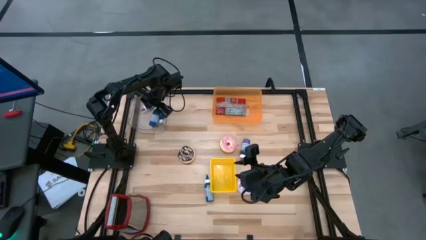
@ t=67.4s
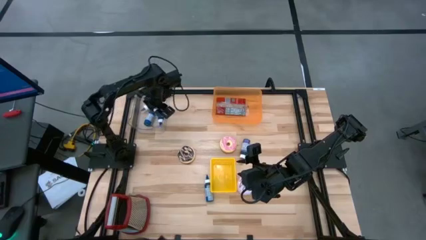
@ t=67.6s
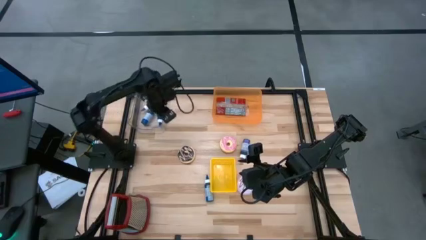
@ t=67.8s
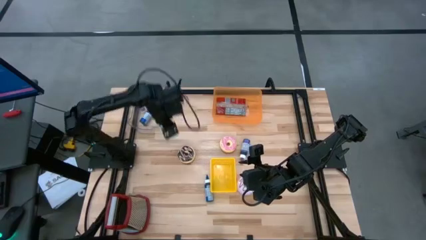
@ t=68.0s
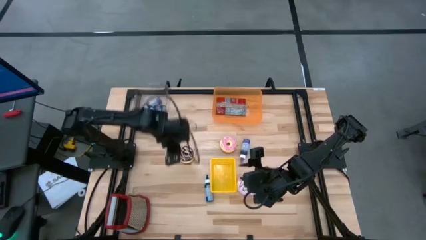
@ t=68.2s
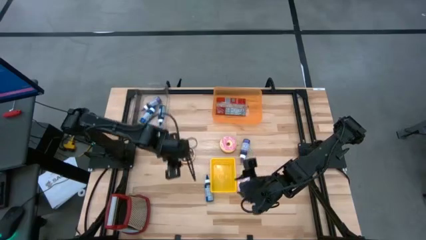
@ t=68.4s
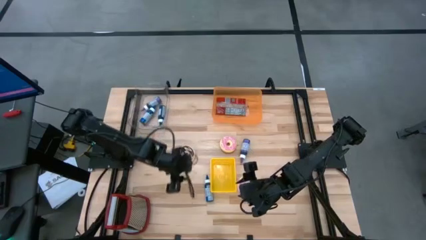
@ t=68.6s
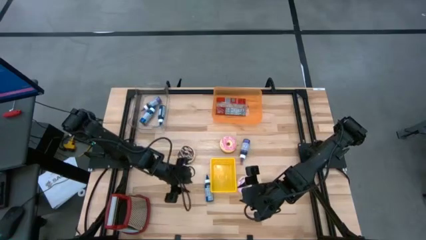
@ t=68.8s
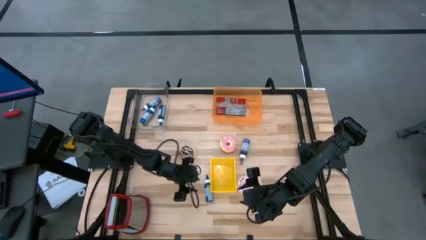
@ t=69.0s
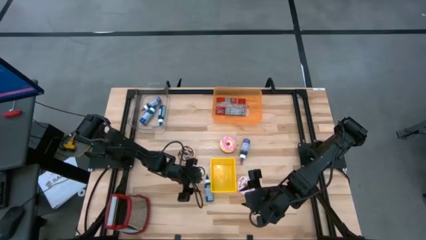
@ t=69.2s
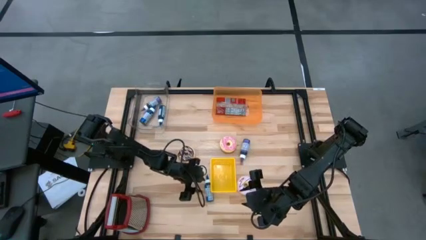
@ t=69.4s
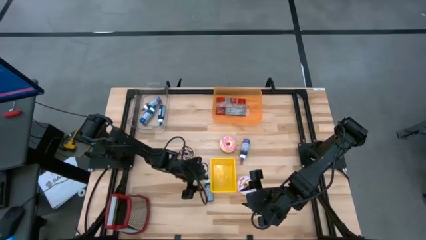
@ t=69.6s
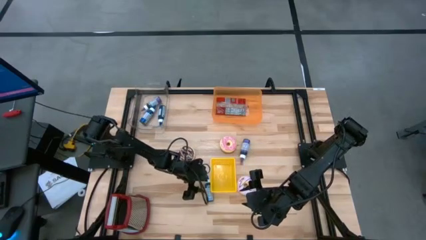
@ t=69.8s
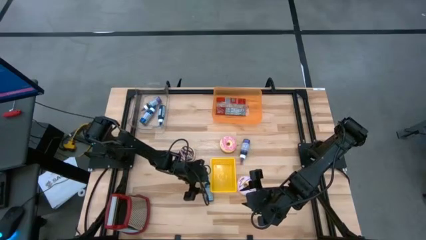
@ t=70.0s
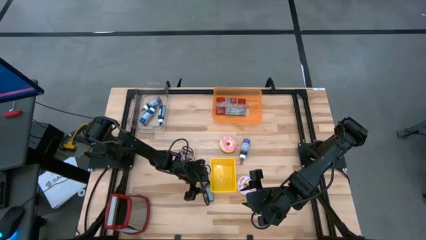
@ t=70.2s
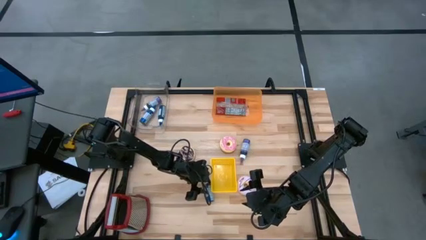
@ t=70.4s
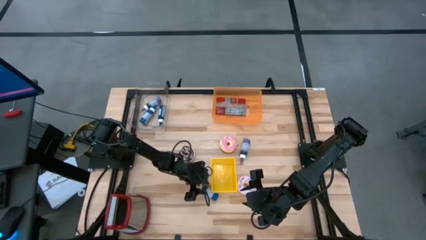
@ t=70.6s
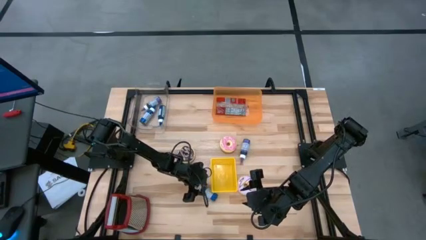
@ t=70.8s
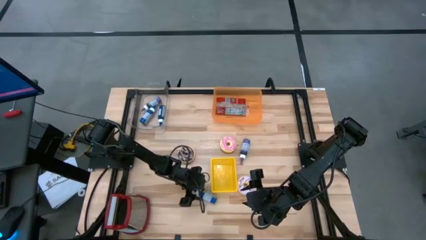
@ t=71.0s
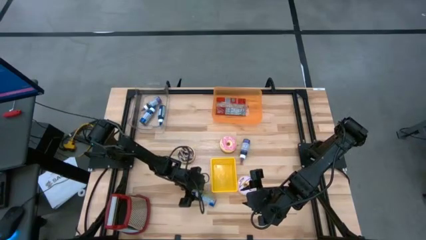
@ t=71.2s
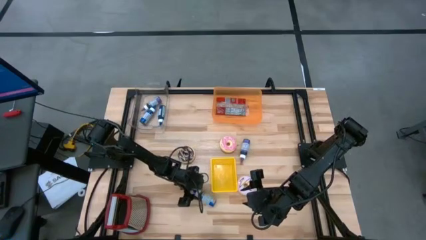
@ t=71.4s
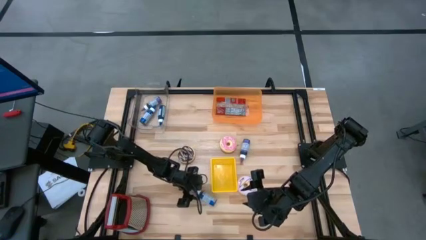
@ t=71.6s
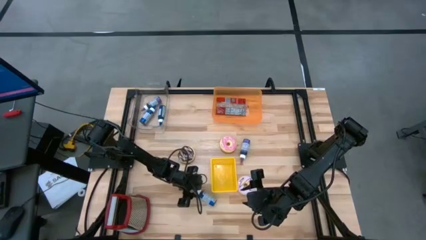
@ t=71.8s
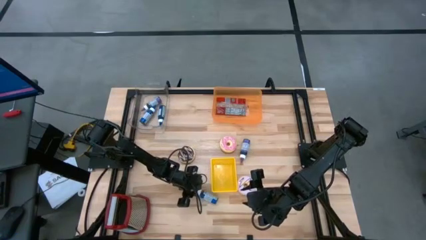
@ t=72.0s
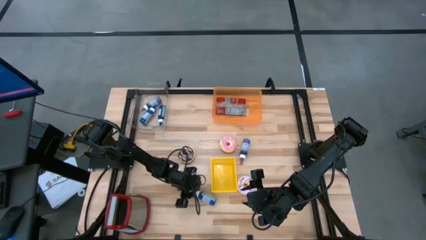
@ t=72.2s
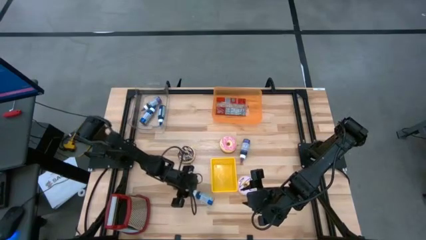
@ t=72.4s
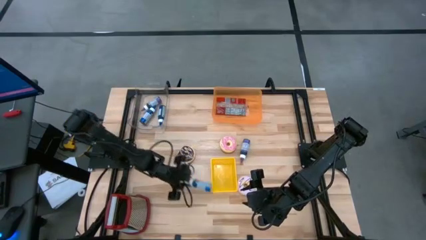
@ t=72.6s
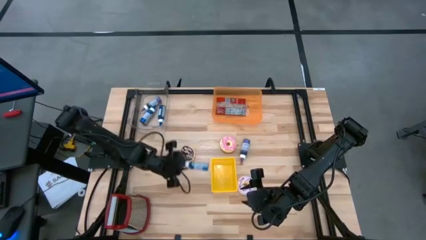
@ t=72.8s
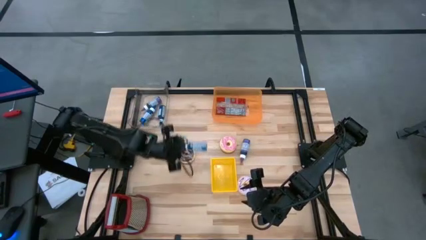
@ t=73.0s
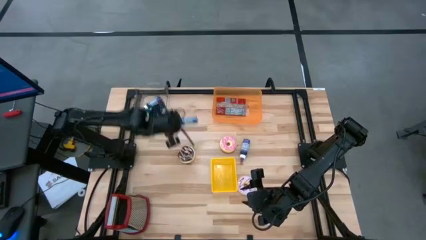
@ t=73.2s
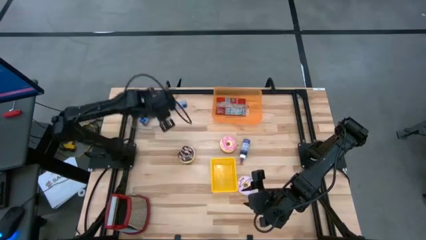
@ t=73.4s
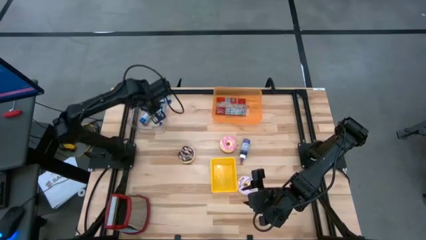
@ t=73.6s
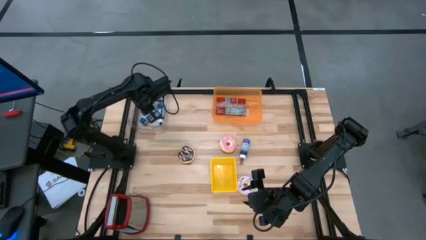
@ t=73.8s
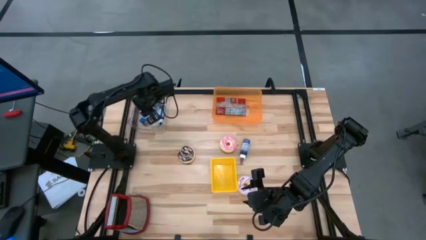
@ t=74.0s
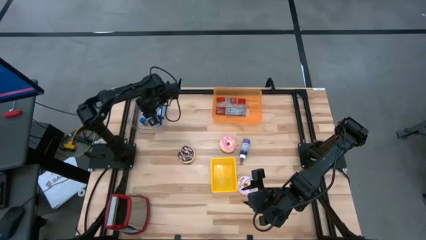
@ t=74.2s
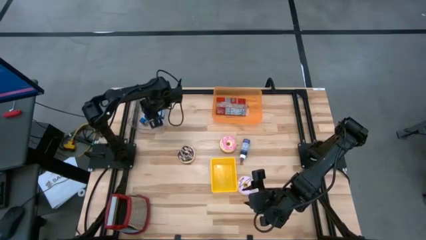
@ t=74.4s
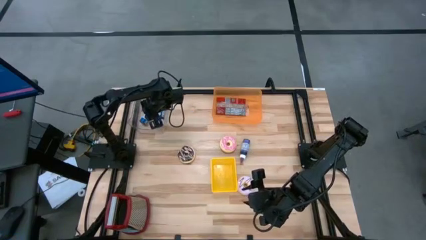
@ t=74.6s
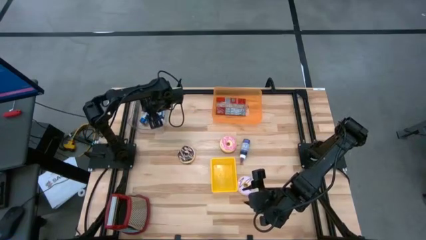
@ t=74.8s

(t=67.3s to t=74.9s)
Put the blue food coloring bottle into the transparent bin

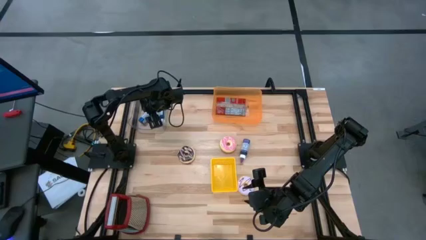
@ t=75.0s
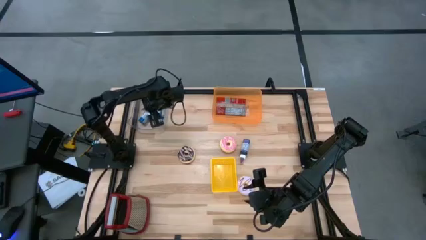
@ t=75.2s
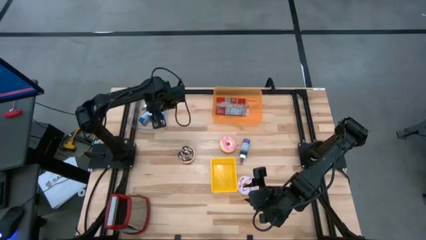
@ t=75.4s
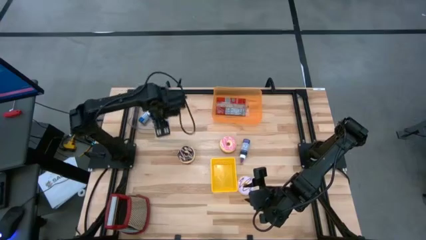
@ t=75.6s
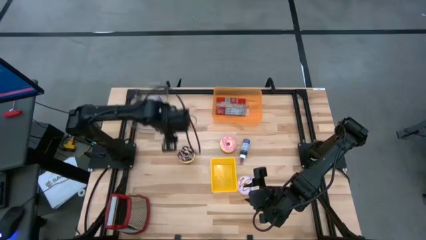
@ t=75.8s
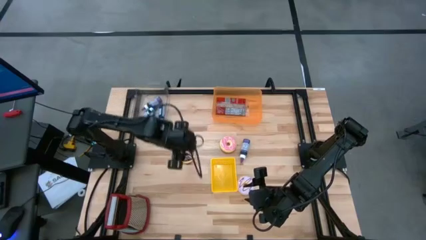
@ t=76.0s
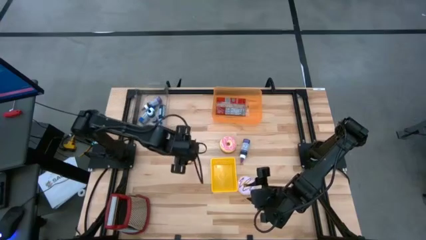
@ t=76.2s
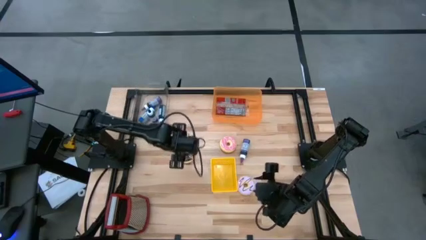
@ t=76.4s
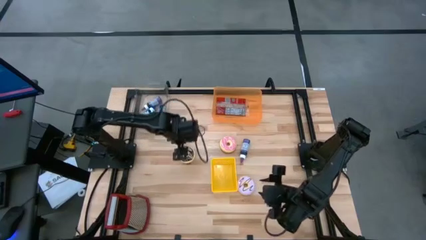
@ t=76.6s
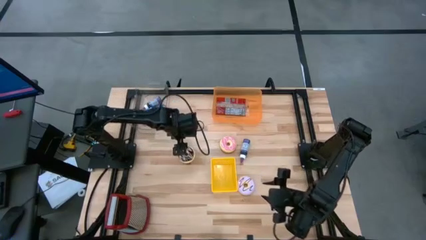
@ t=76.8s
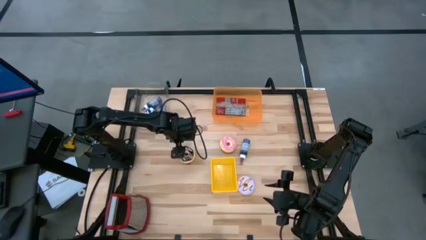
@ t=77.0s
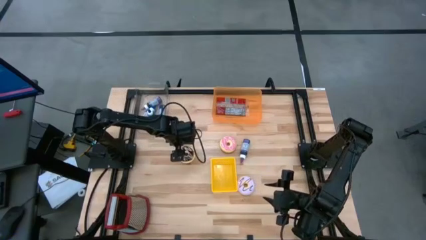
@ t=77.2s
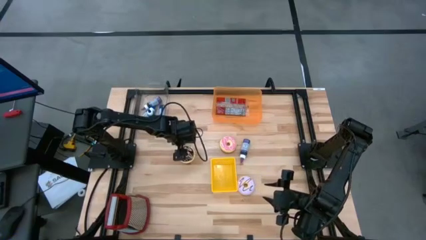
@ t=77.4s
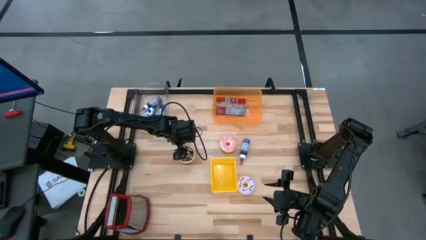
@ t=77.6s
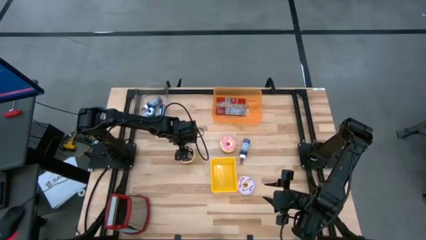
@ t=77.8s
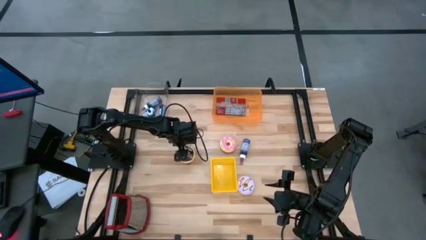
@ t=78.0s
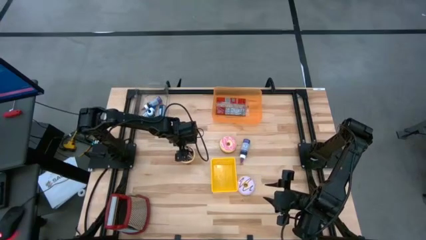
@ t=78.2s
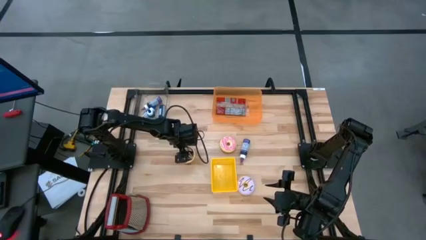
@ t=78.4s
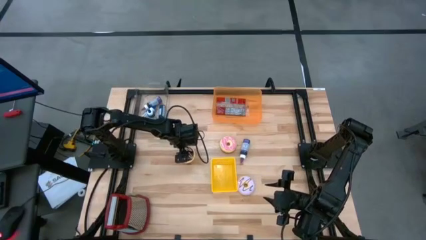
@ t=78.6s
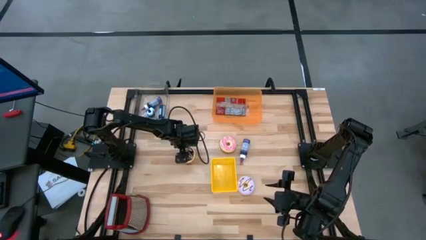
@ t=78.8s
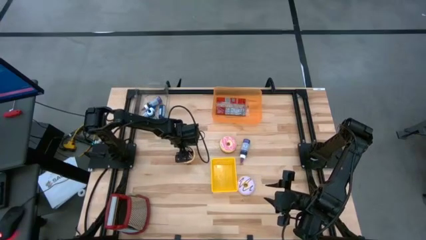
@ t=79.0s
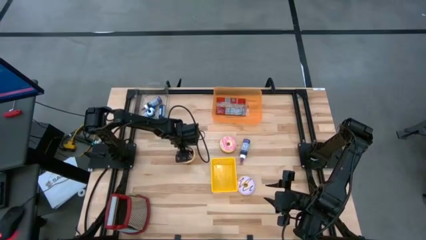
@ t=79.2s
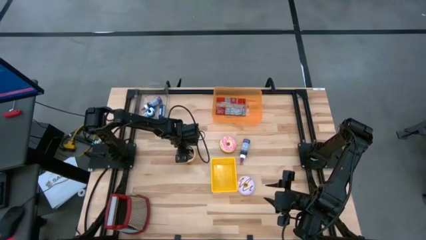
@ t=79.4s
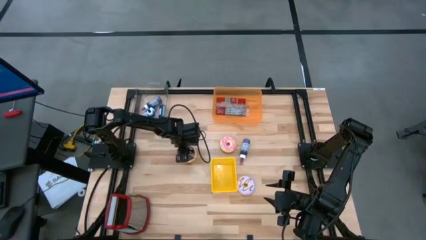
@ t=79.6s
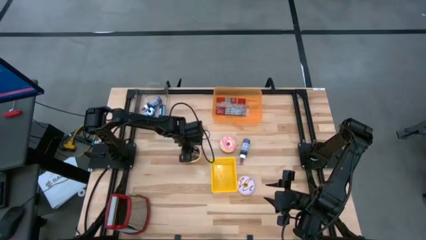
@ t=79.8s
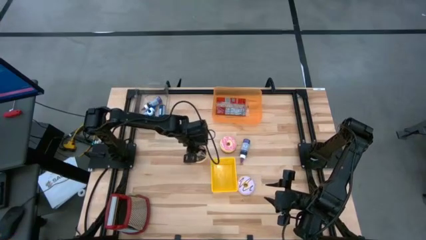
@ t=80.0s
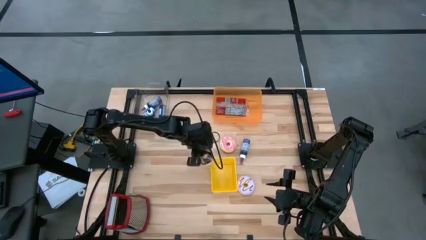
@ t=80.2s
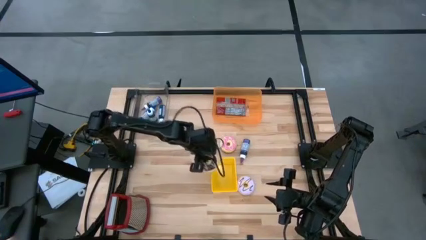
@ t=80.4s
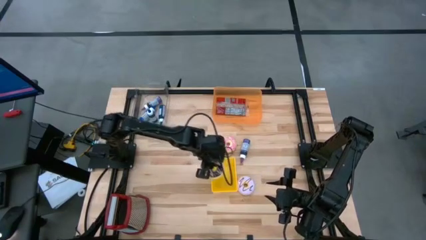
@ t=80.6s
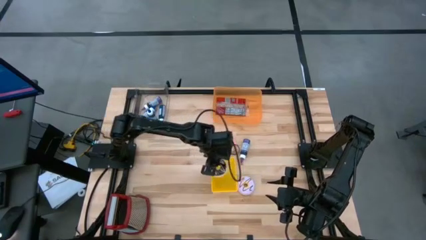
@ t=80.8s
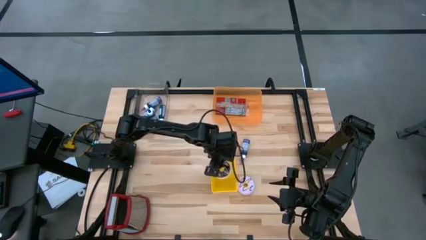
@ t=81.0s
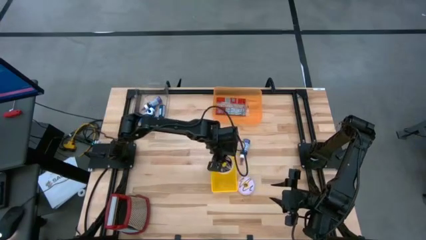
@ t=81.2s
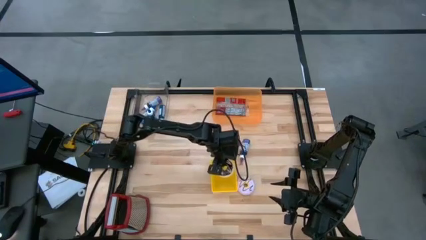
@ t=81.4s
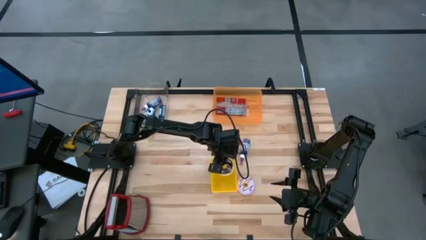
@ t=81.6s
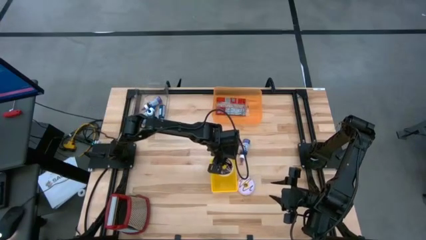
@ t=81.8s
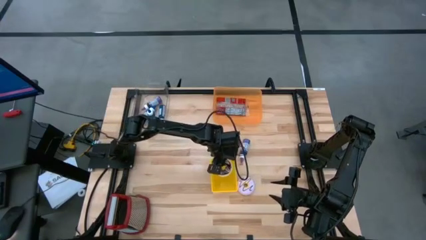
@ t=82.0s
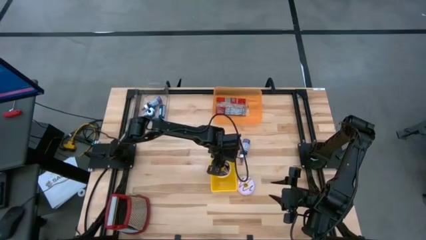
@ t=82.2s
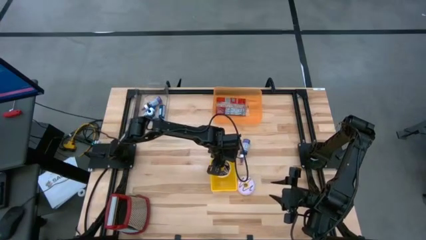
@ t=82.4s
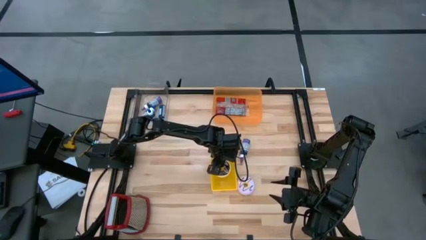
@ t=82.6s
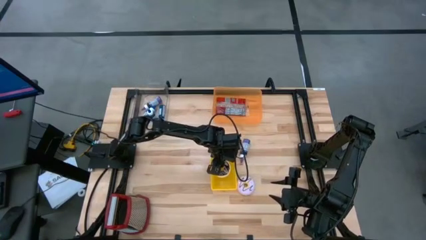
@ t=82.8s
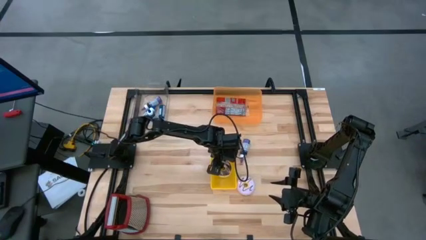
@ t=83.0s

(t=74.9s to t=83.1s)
Put the black donut into the yellow bin
